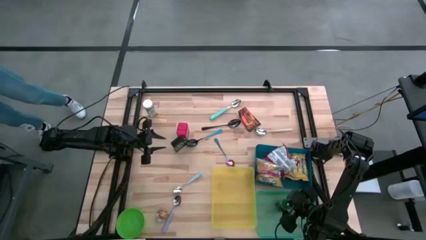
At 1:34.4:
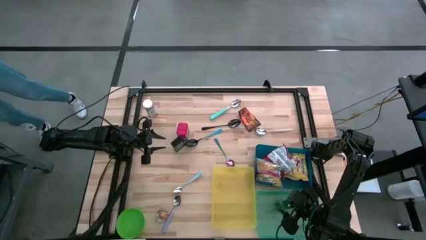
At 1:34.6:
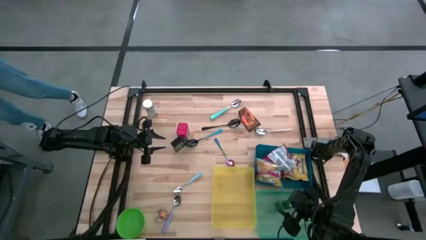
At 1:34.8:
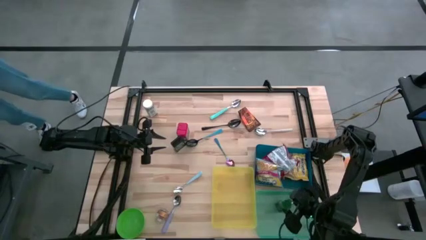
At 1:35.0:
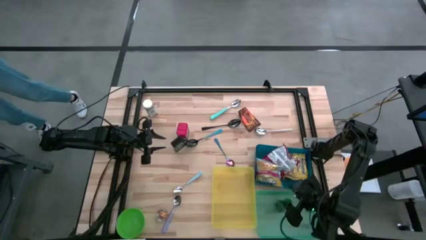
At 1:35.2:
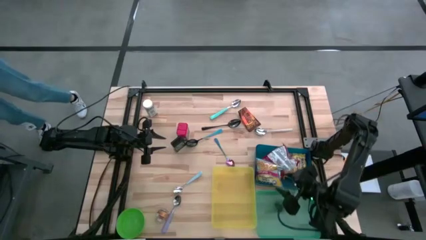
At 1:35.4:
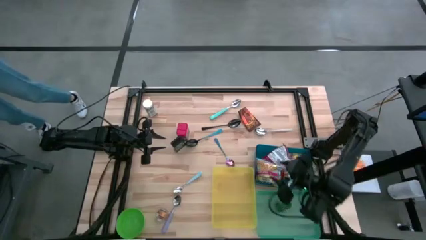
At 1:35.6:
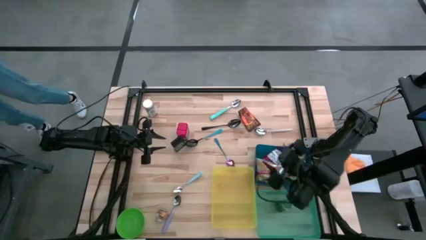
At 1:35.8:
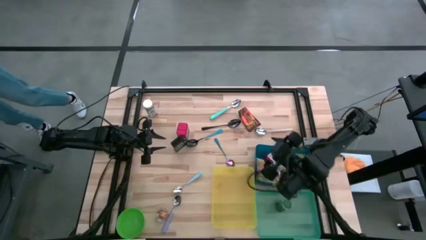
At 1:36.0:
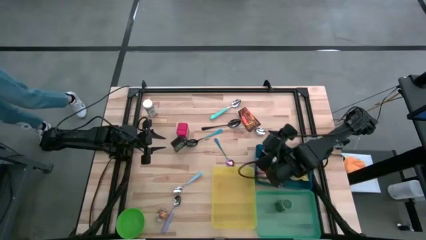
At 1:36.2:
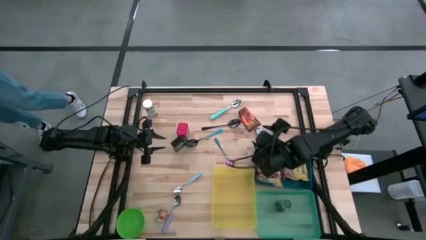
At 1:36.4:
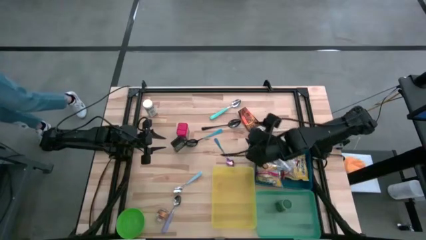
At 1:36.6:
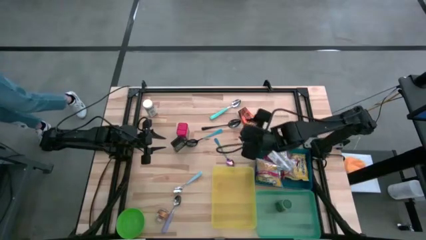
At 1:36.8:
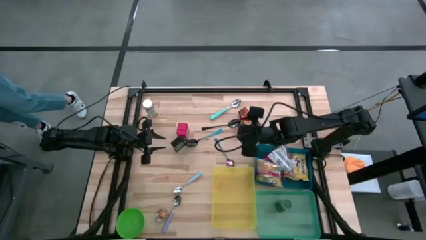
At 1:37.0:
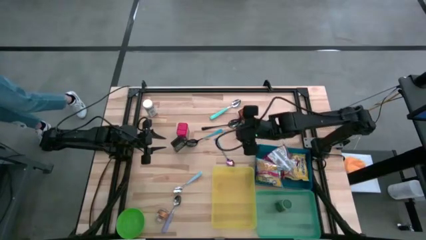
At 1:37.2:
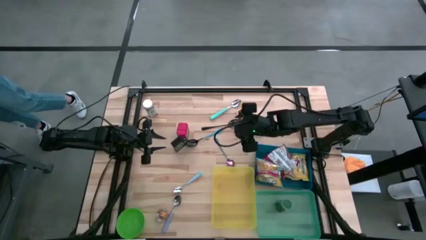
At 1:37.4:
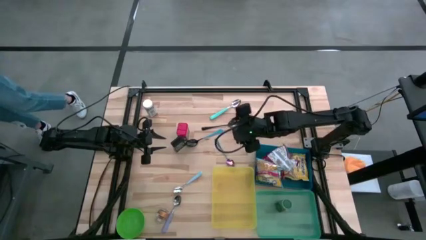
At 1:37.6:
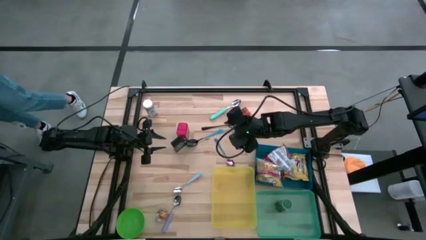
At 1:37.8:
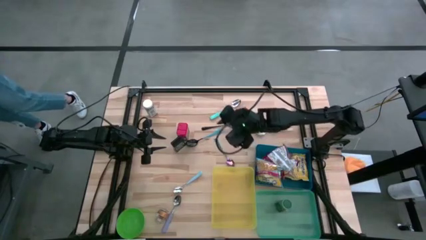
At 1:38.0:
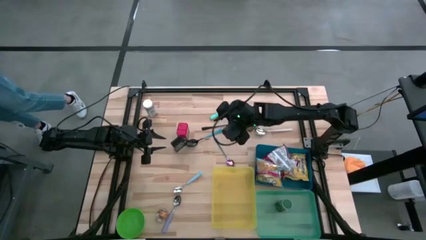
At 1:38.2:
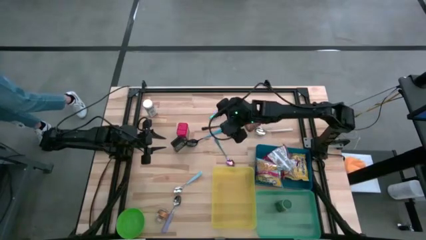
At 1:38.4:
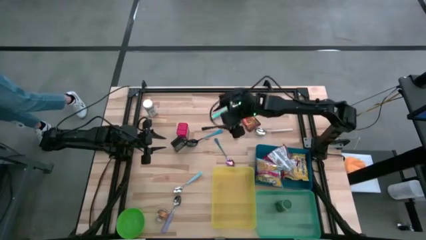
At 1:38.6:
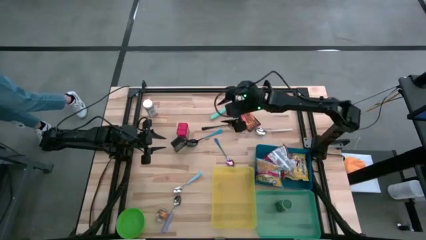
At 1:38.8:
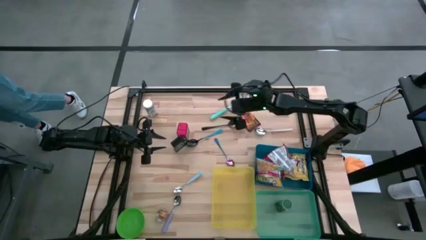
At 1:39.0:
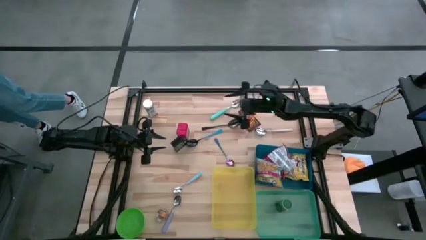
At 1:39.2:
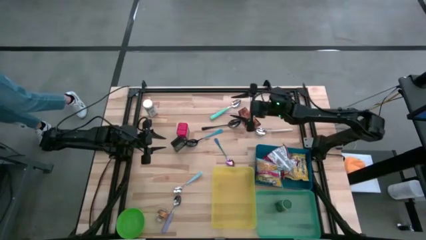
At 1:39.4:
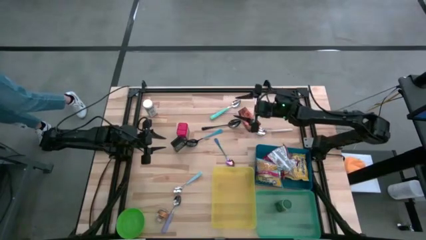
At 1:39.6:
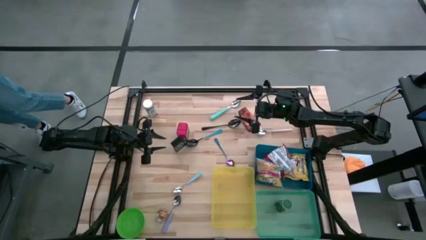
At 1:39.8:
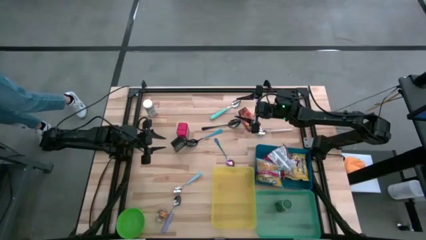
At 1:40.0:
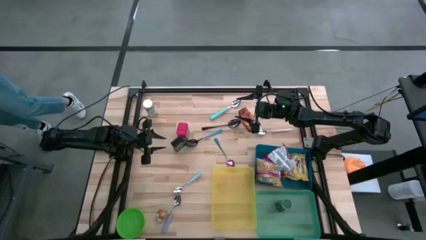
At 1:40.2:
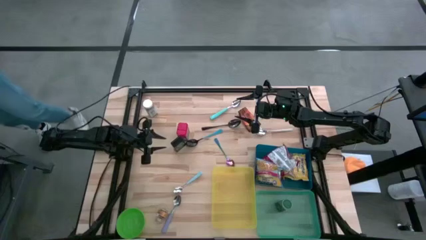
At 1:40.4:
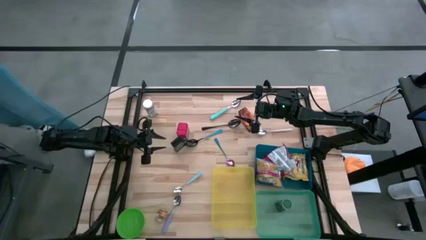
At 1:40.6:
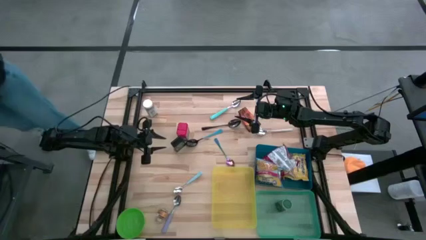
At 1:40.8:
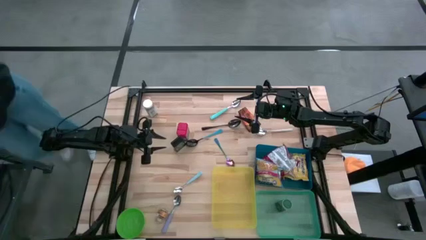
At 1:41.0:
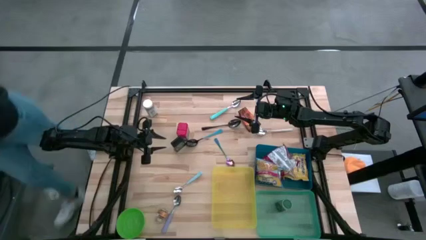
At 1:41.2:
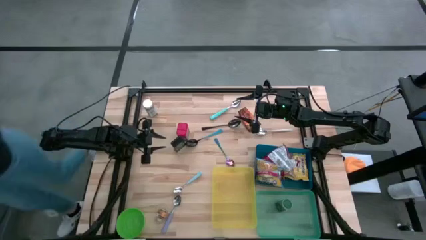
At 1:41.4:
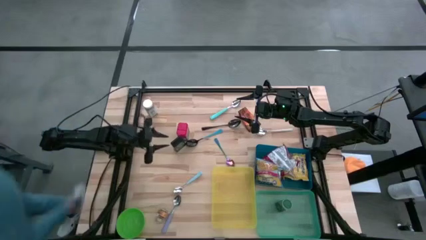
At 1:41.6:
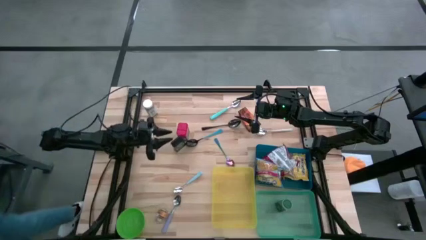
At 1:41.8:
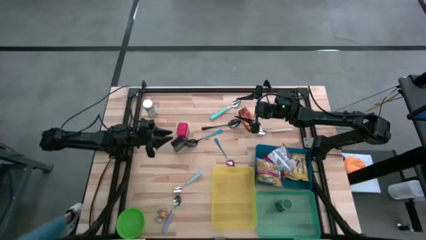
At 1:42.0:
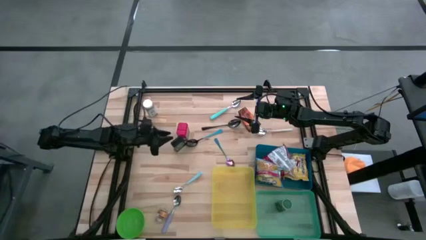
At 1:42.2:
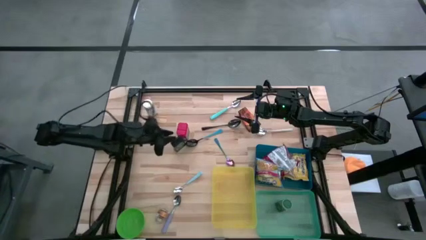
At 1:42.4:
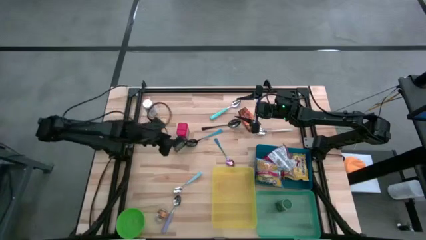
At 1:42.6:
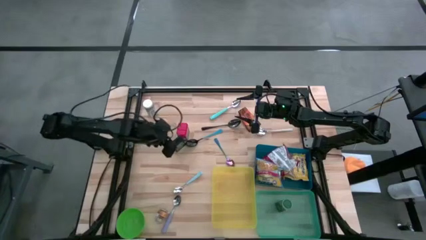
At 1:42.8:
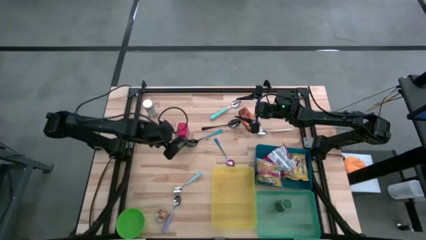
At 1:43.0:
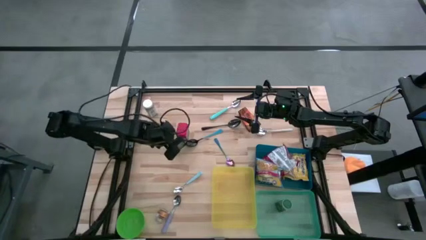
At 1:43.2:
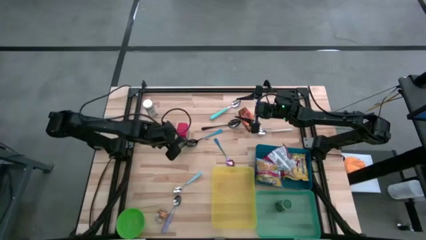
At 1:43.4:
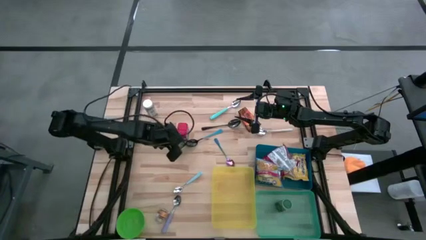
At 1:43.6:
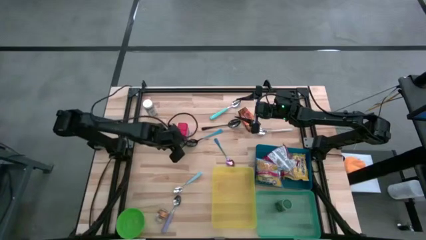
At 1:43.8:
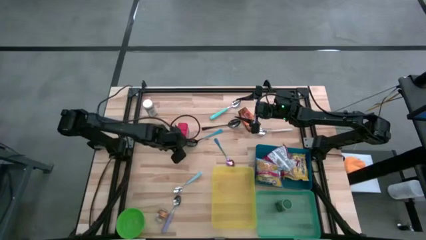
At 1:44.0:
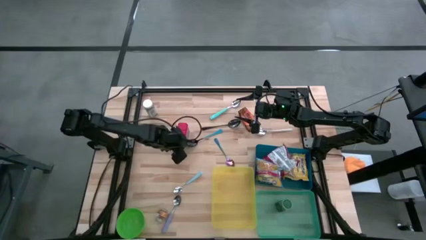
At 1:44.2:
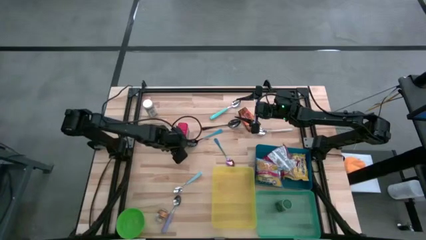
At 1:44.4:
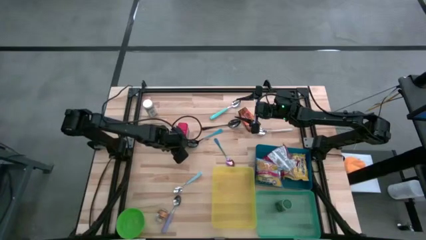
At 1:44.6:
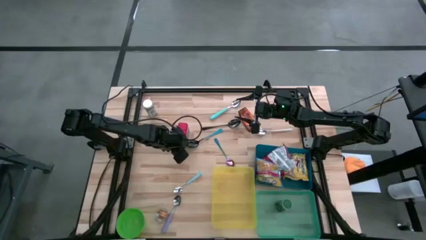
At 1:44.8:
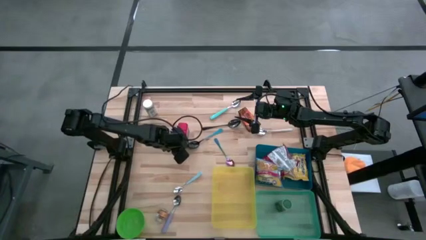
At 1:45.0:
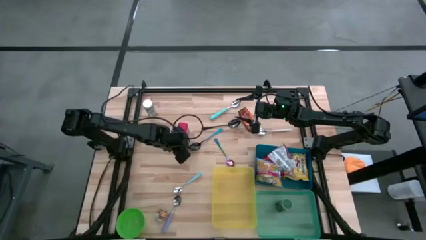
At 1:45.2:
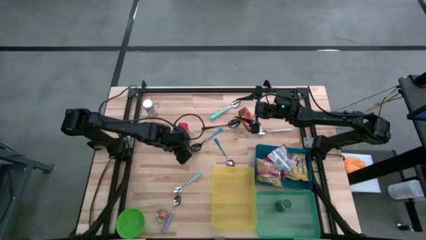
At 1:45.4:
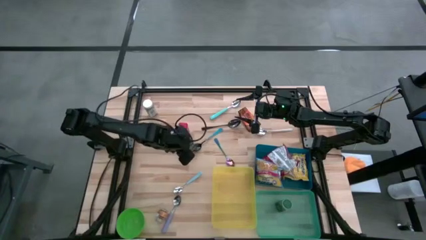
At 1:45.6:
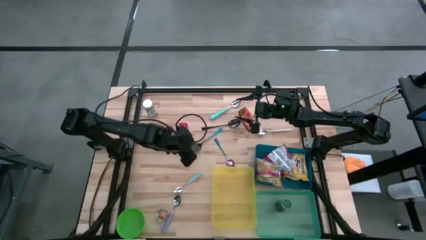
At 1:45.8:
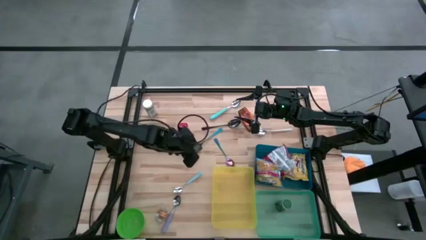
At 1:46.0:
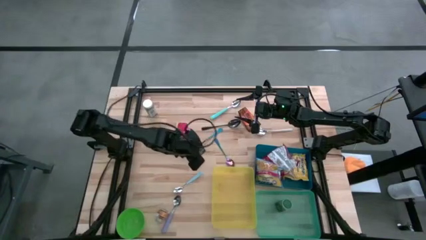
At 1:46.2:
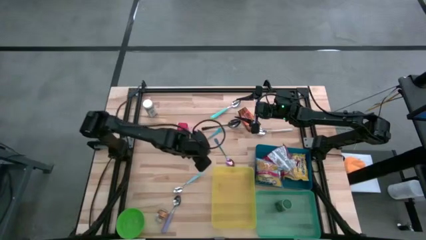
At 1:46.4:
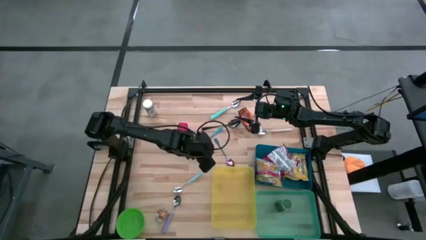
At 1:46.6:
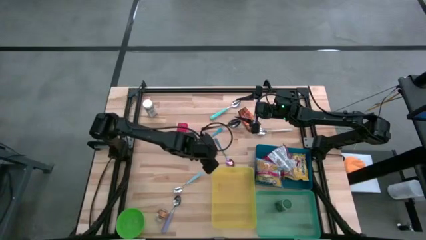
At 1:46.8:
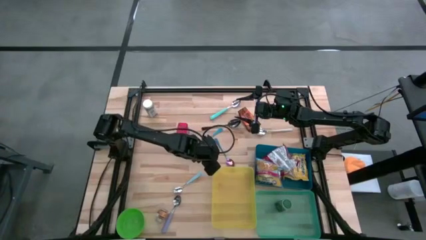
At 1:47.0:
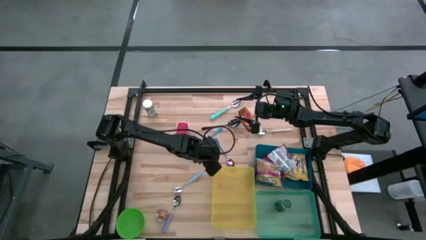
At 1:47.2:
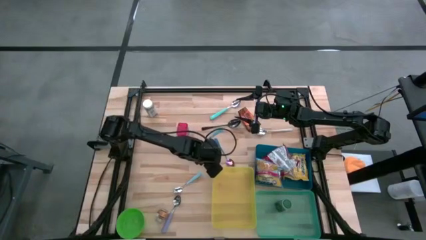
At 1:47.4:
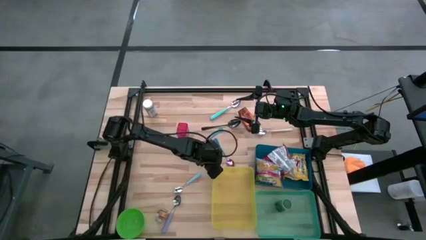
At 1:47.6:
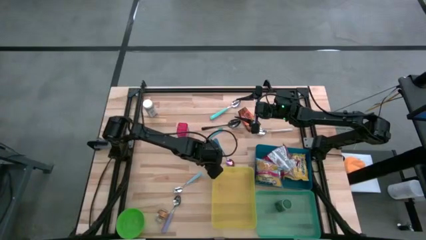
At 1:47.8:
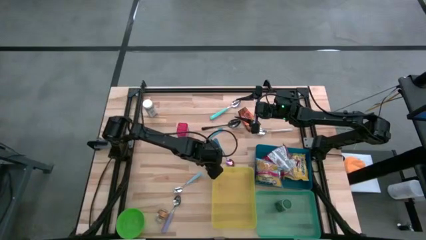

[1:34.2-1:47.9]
Put the black seasoning can into the green bin

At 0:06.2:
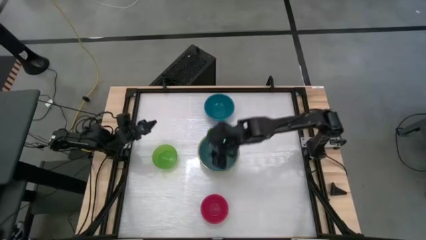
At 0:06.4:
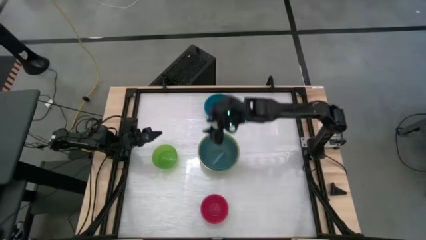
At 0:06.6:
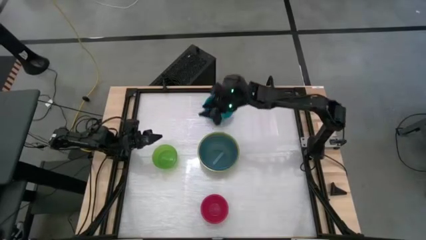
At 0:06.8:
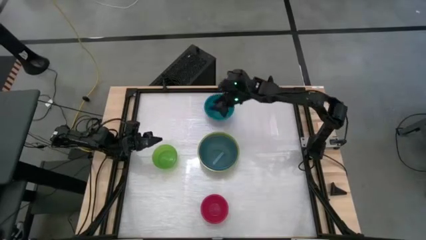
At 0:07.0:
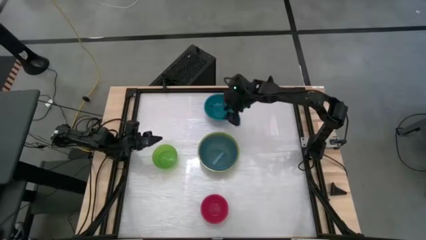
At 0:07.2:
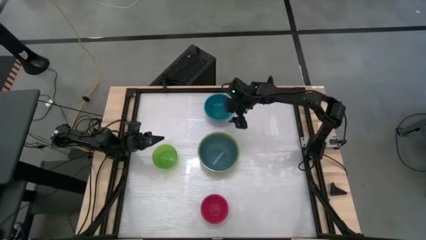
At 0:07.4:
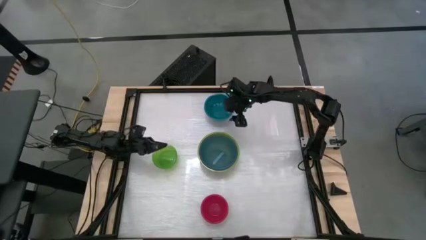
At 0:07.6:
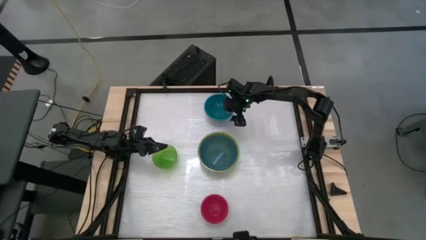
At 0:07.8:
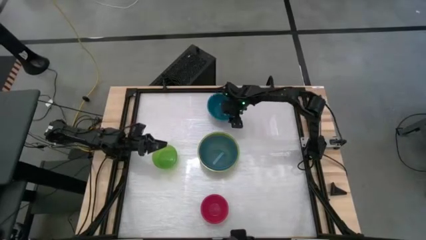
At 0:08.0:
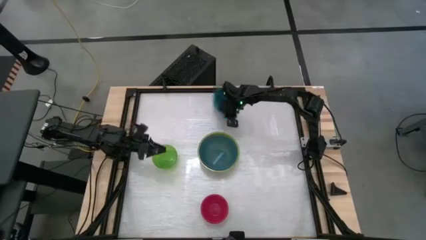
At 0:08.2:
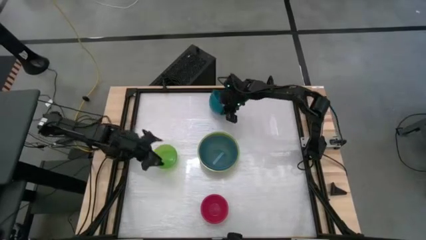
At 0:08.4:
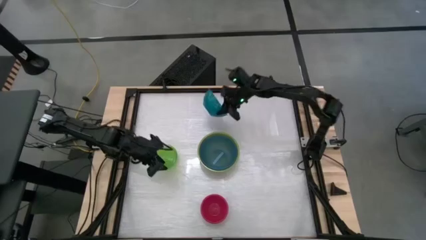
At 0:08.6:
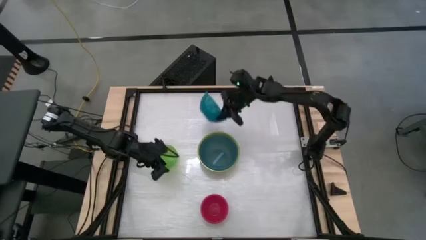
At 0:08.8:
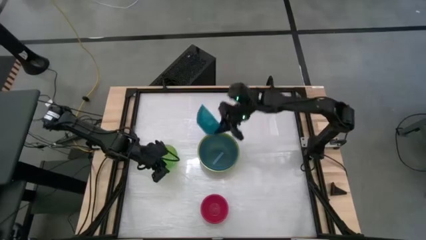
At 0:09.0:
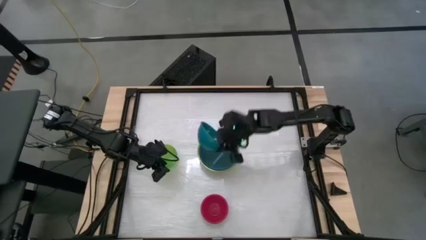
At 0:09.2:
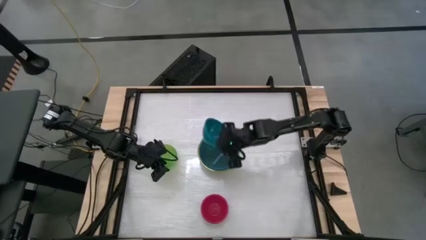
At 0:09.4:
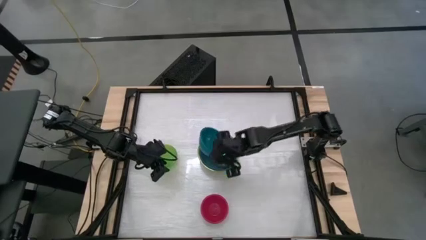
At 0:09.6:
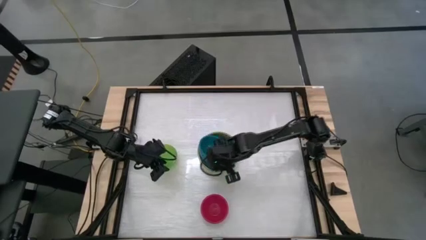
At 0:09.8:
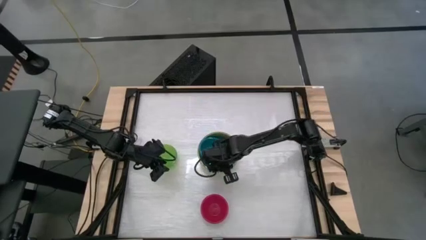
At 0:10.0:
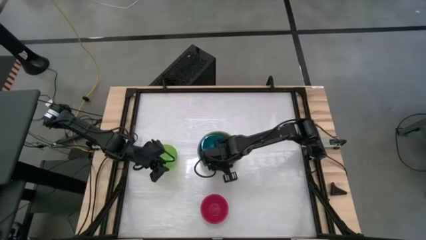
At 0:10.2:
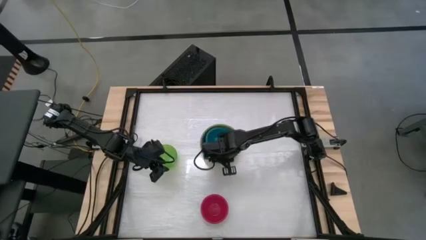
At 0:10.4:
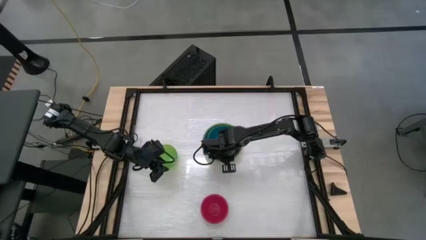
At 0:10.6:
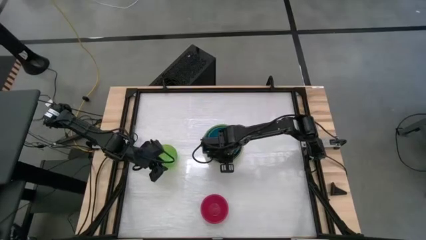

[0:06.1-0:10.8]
Stack the blue bowl on the blue transparent bowl
